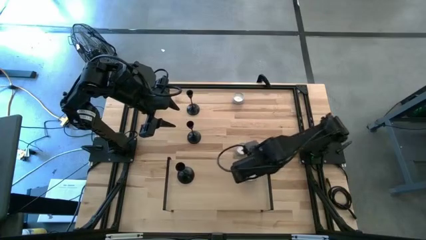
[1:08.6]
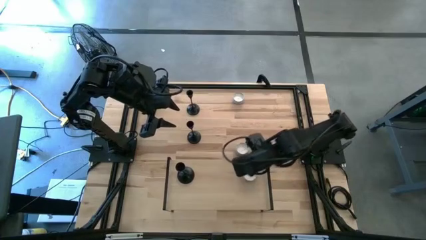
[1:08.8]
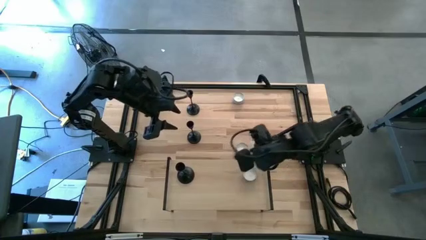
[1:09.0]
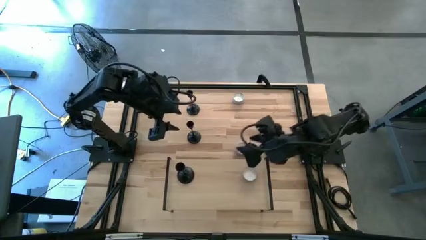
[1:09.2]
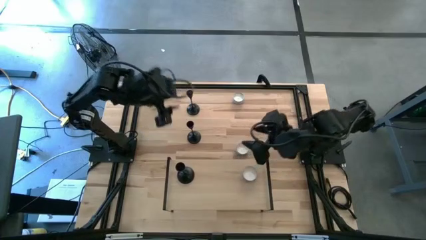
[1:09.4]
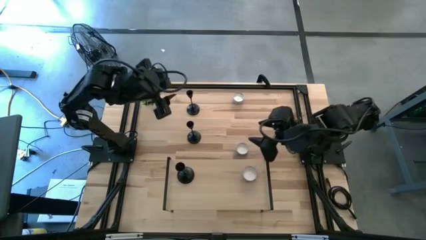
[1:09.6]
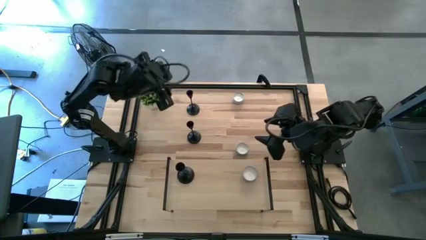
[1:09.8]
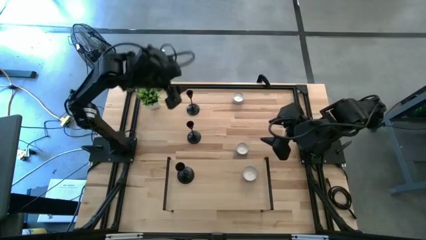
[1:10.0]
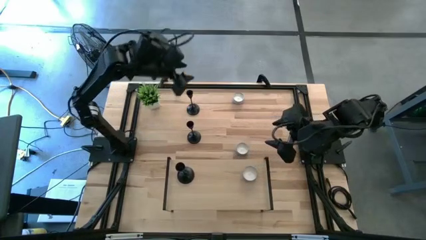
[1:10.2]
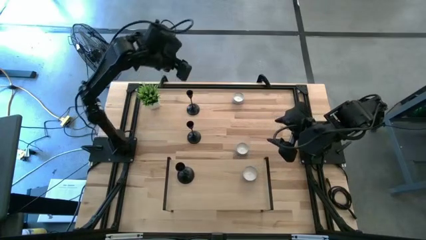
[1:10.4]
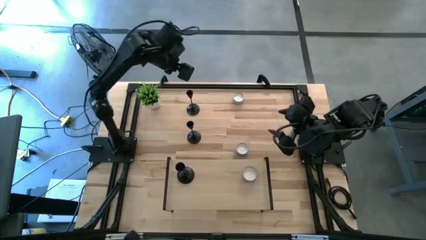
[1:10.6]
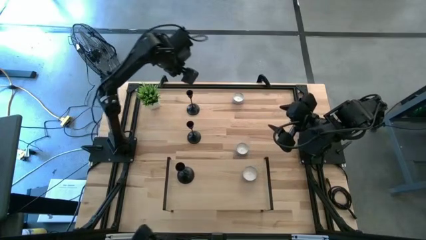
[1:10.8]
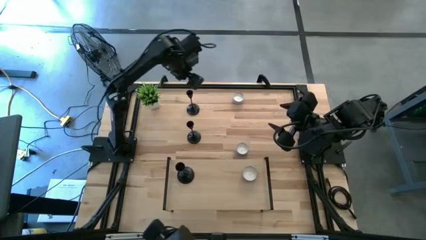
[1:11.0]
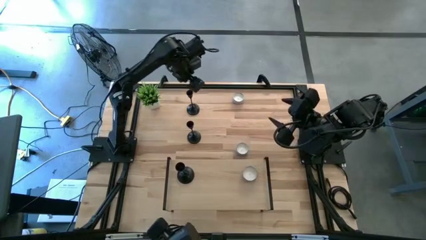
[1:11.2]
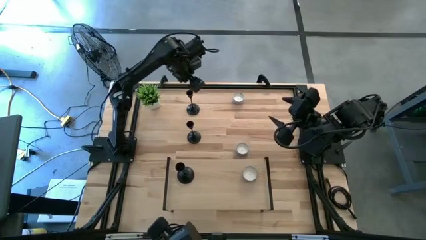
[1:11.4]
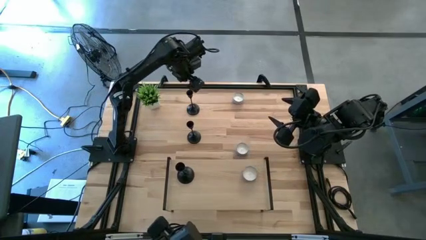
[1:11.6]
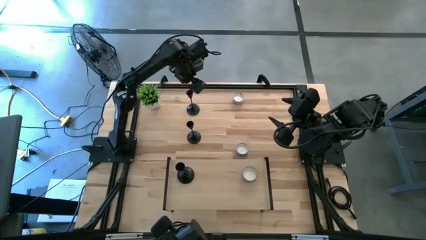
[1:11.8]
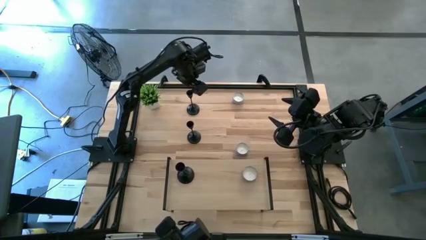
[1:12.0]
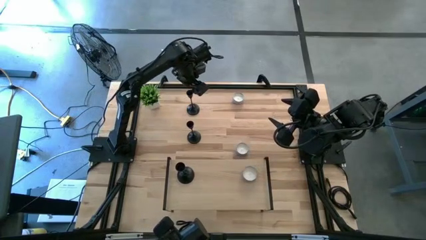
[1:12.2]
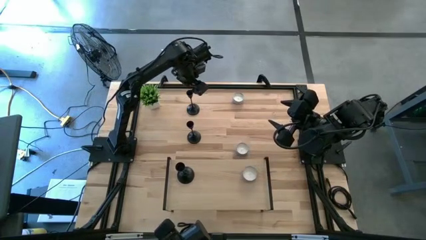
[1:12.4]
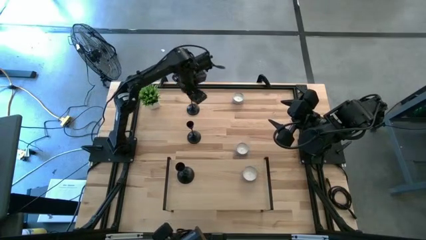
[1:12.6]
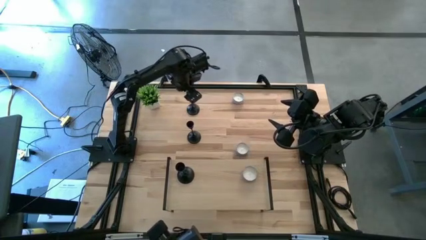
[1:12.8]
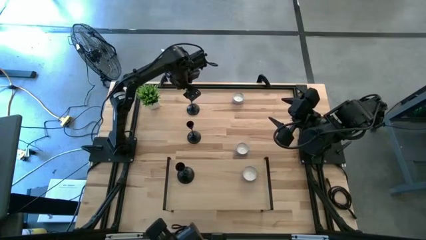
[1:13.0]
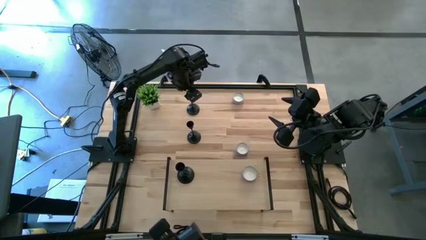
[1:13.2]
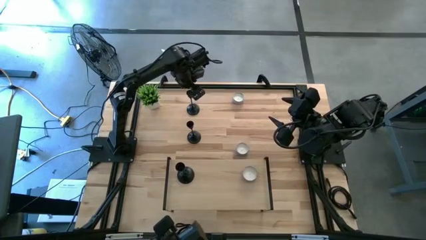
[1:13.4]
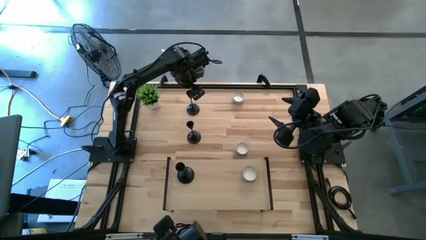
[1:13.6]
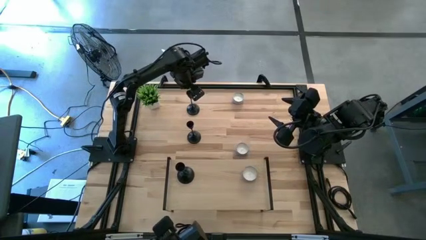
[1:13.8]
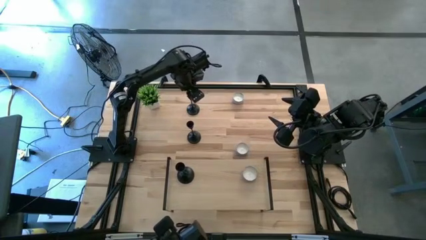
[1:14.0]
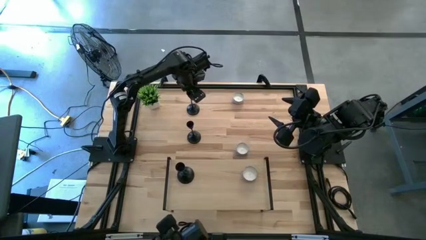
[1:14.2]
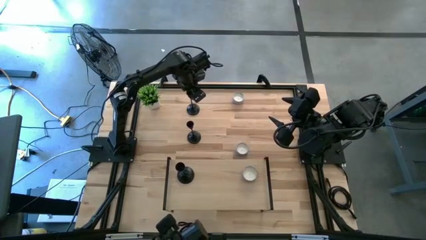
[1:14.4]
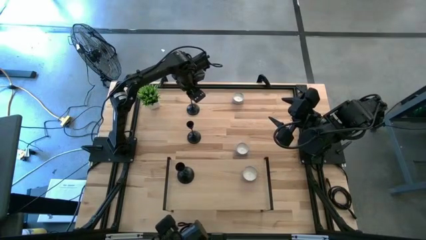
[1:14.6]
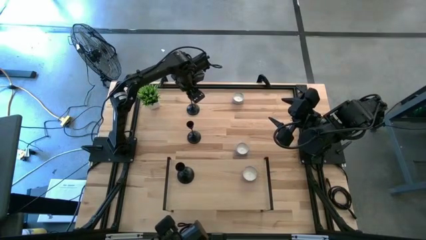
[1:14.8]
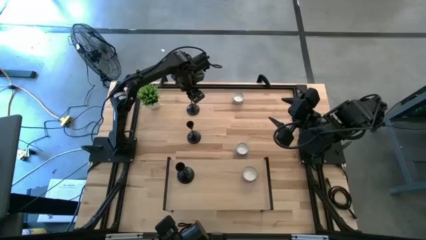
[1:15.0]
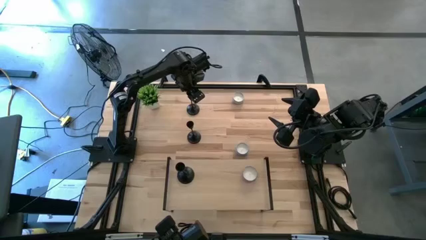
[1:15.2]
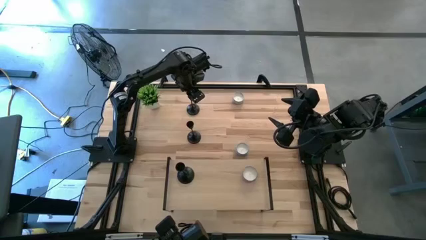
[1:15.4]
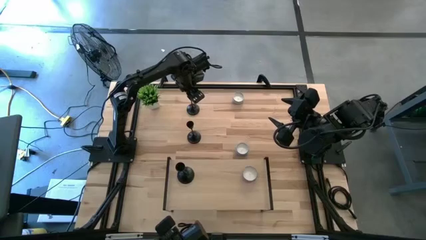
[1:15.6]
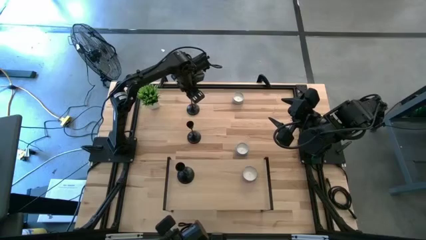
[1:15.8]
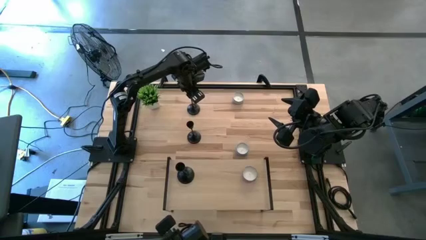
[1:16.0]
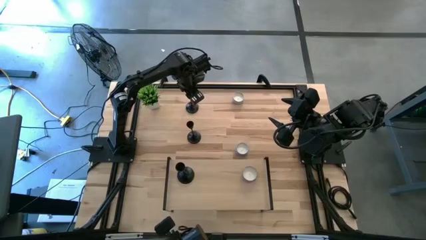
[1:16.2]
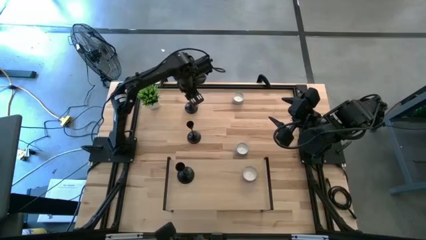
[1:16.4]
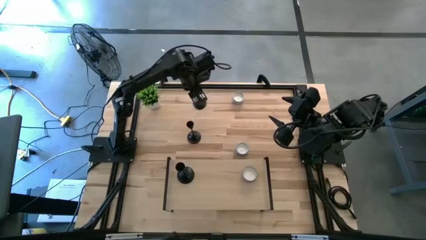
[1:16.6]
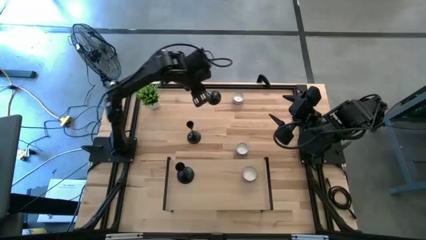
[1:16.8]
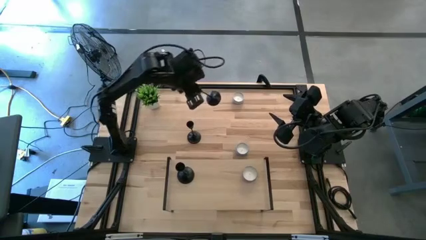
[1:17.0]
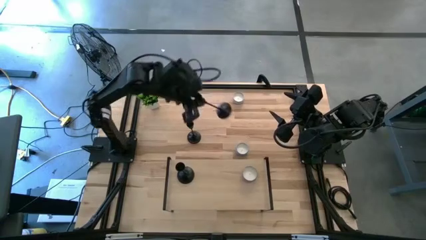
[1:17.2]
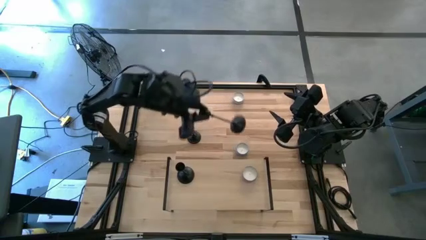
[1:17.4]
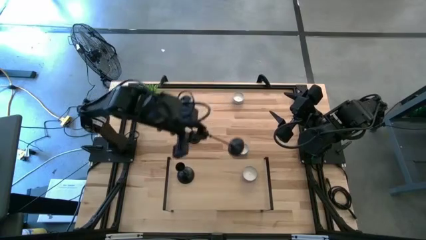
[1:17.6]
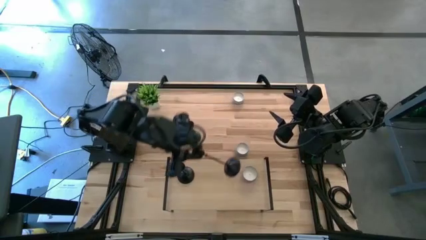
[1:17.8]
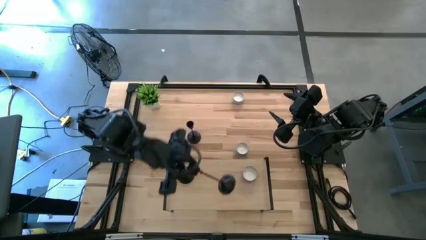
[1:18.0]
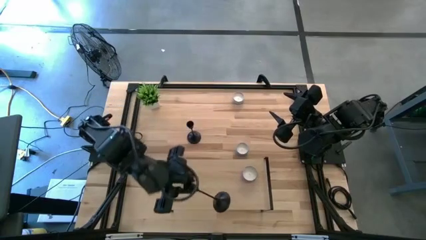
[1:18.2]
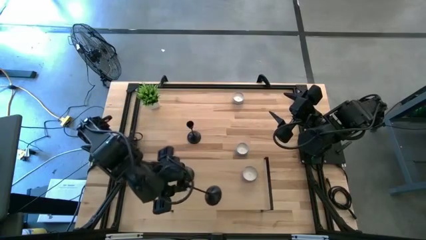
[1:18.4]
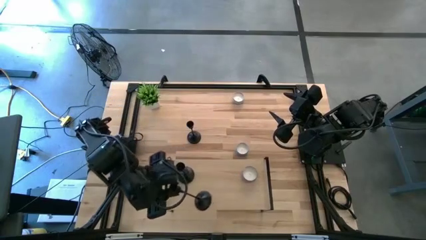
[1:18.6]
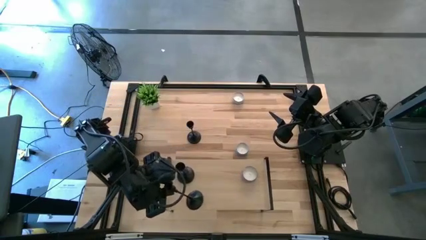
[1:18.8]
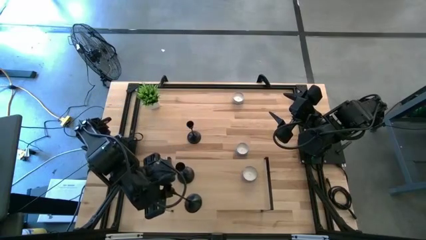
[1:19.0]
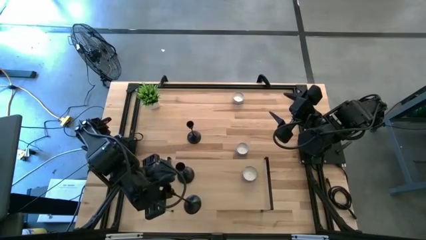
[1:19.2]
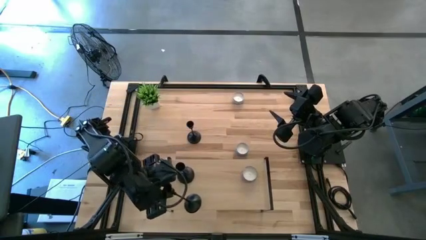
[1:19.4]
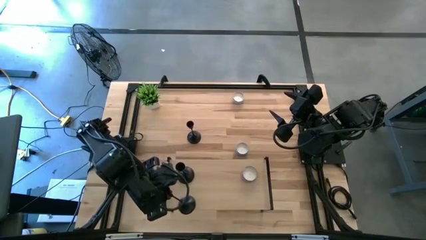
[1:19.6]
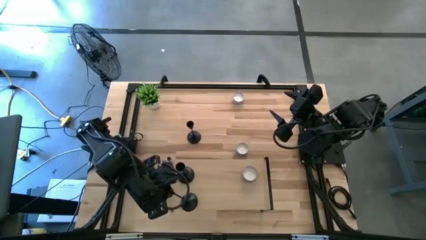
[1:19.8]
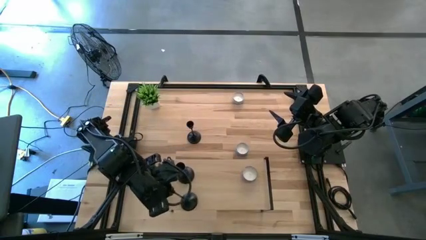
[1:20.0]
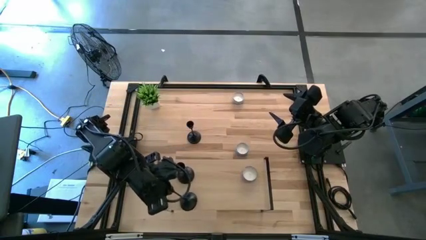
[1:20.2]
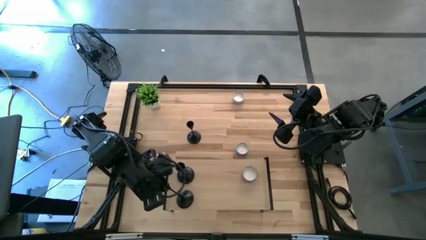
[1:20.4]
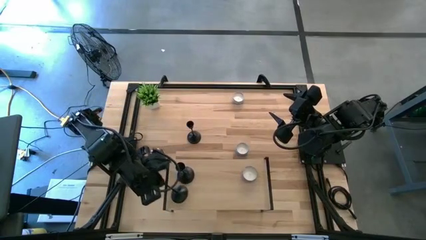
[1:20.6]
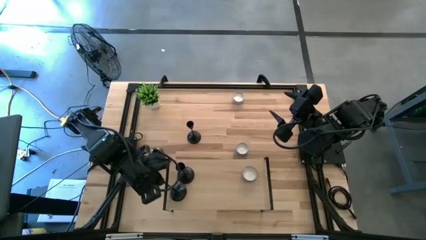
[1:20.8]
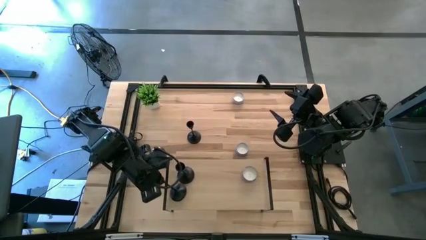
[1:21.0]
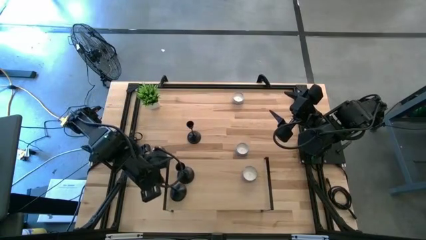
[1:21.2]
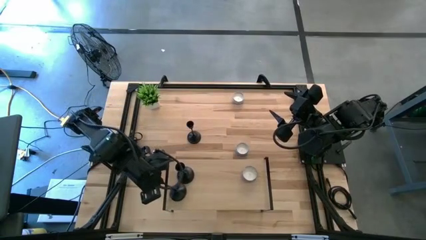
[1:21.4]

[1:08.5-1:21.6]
Task: Pick & Place candle stick holders
Put the top black candle holder on the shelf
